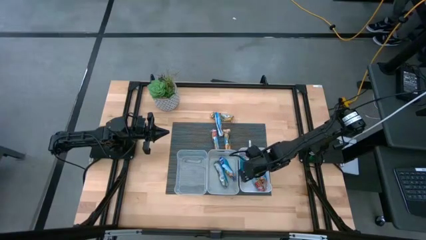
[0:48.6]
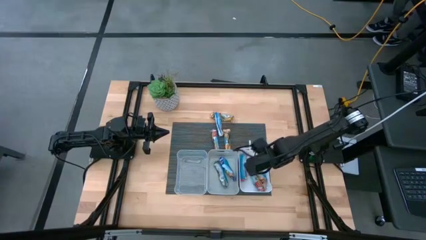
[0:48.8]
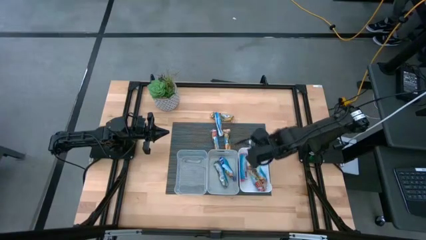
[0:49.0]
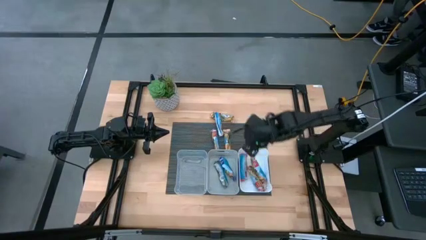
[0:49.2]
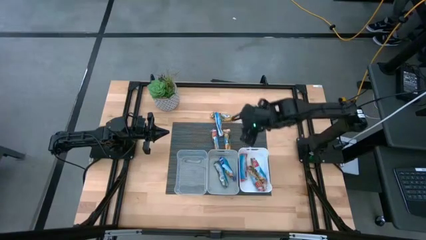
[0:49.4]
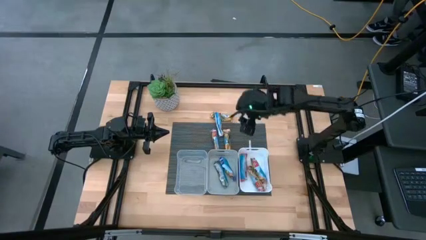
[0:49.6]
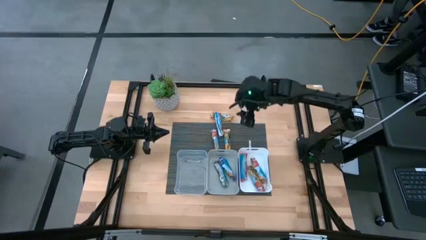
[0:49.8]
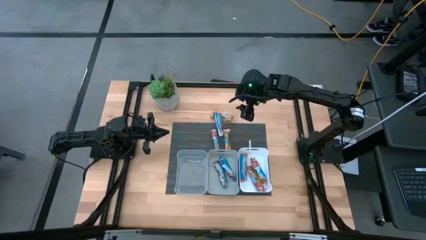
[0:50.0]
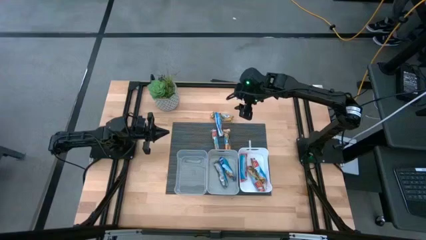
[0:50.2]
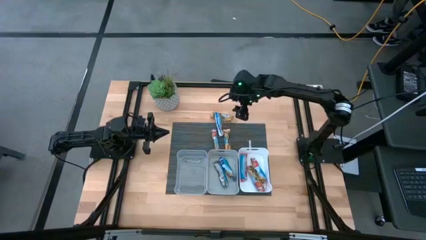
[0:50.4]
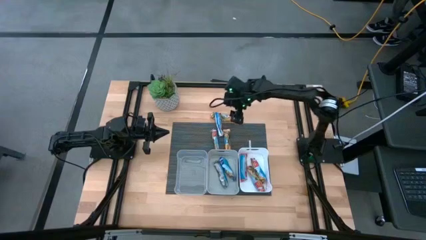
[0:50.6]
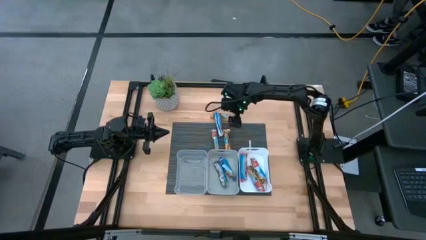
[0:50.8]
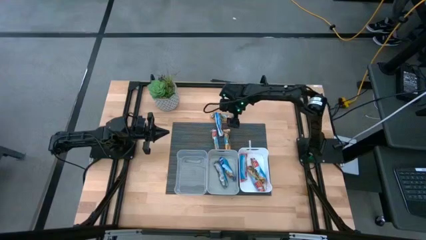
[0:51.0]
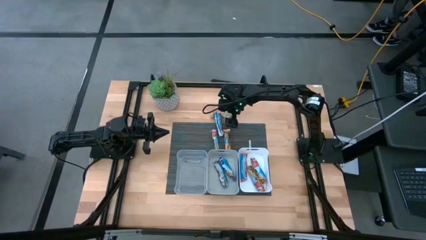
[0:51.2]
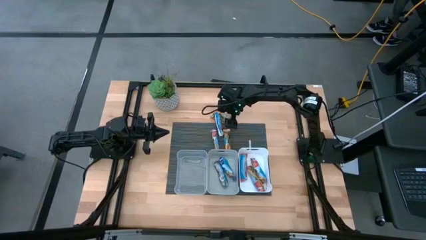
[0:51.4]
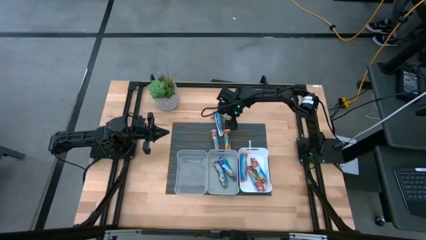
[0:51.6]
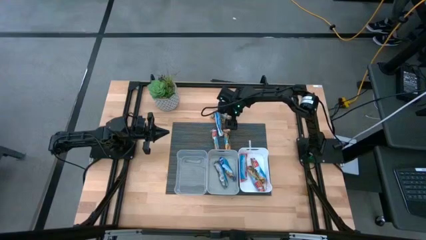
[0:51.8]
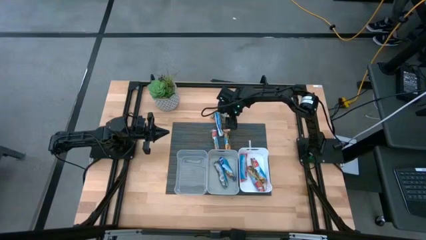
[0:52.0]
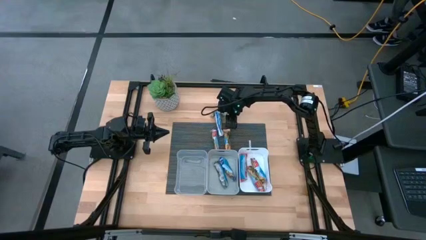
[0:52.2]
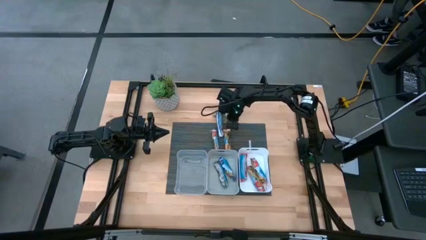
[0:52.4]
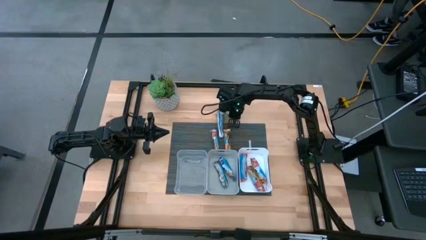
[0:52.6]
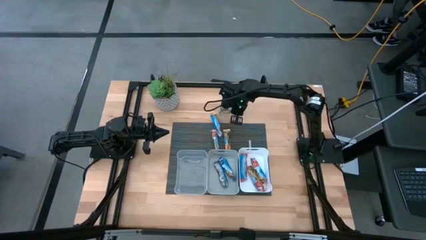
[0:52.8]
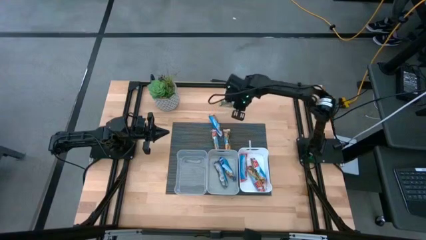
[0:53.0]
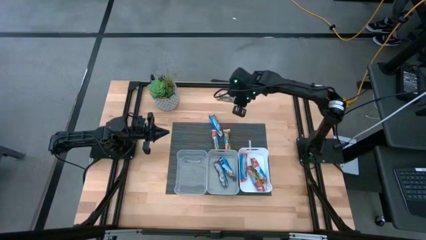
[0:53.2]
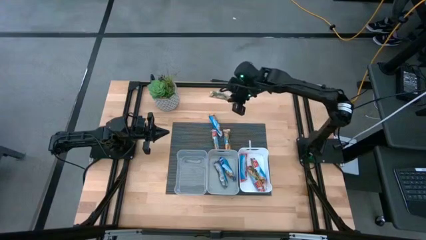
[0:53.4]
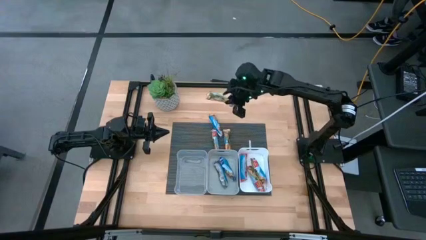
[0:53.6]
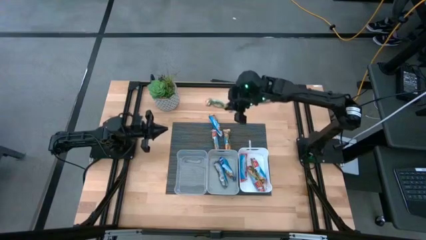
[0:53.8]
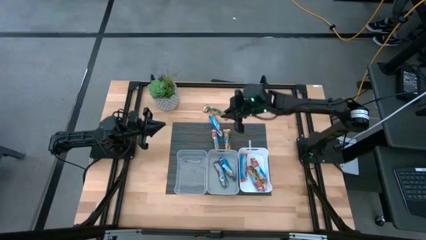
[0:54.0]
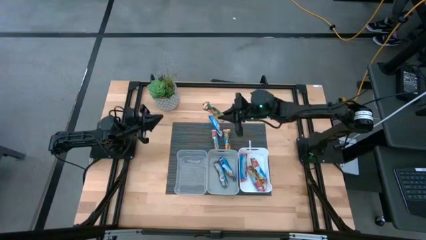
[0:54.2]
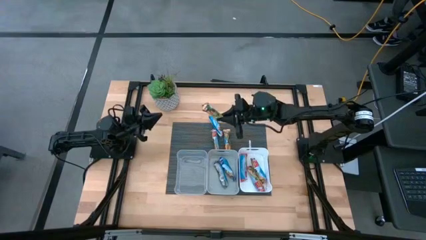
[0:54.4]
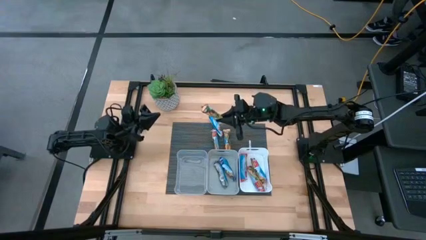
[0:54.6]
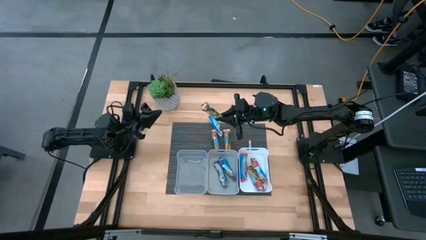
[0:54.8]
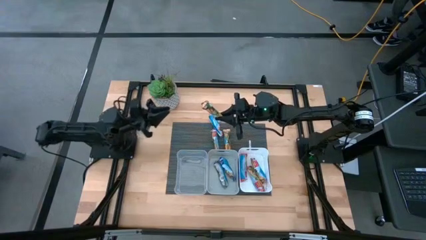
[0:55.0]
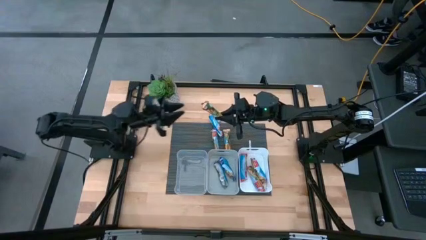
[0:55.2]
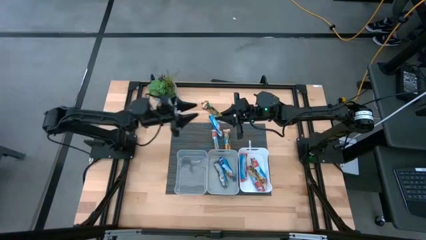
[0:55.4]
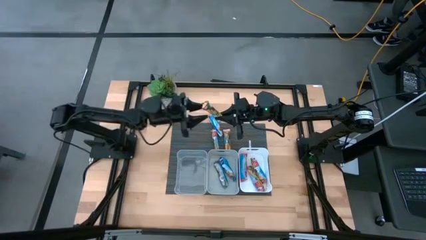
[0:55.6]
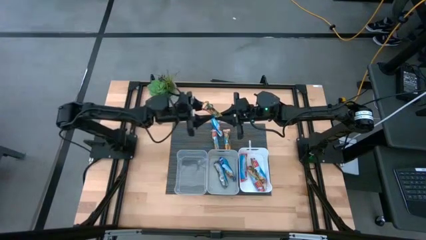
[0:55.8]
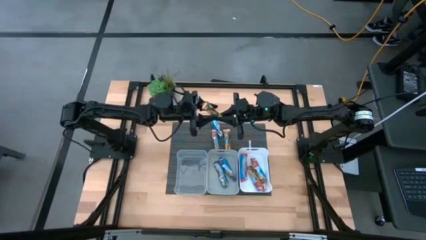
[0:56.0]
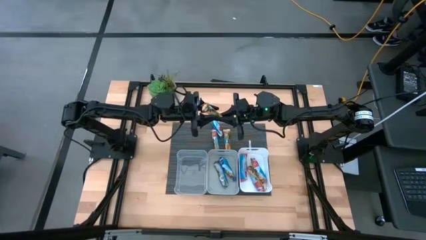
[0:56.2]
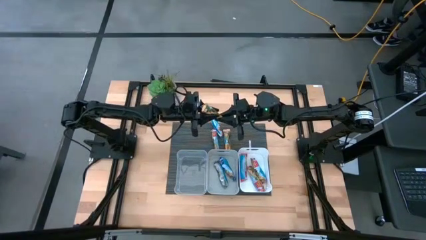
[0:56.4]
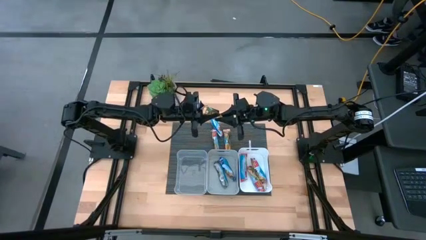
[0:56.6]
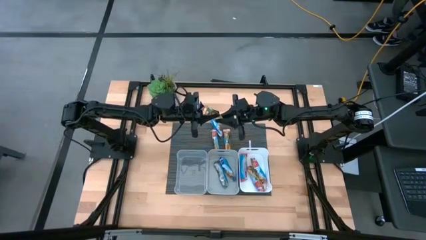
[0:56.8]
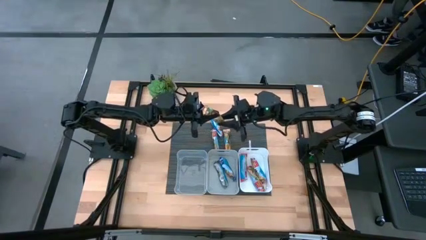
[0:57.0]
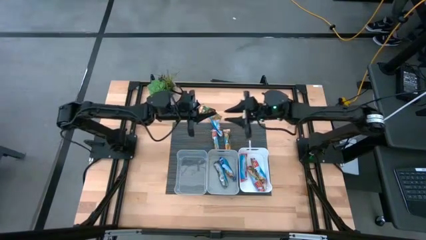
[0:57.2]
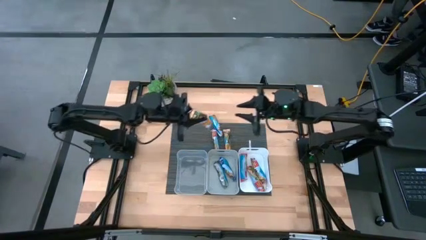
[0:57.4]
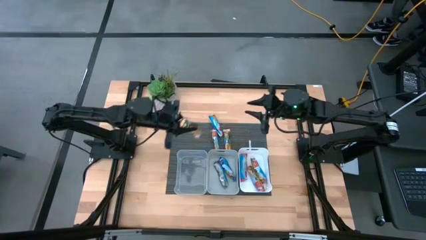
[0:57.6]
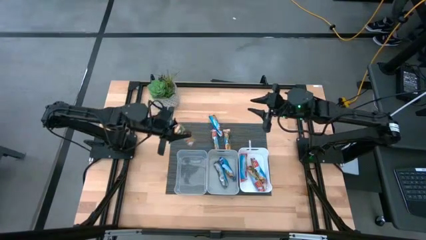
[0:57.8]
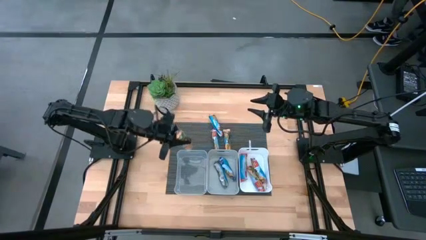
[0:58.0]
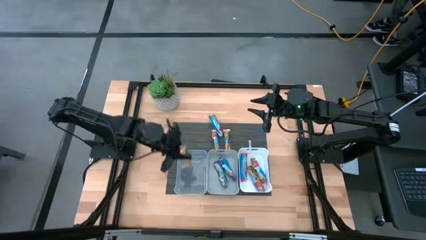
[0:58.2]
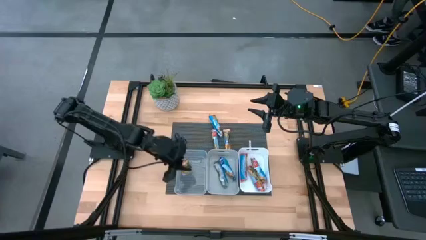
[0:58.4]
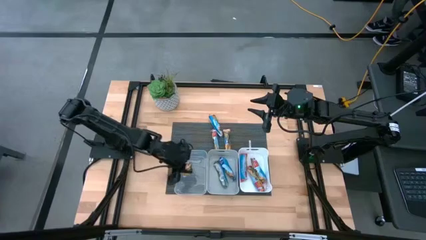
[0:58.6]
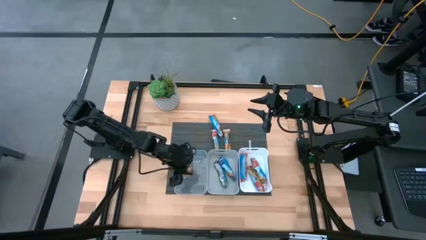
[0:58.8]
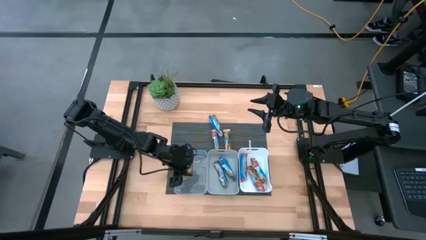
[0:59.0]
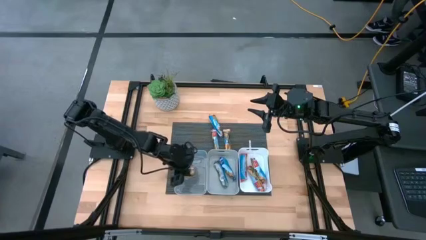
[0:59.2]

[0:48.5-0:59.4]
Task: Pick and place Granola Bars by type
Put the yellow granola bar into the transparent bin

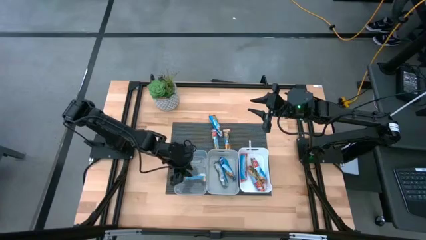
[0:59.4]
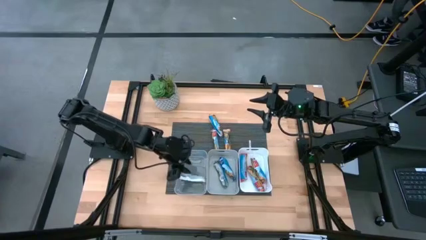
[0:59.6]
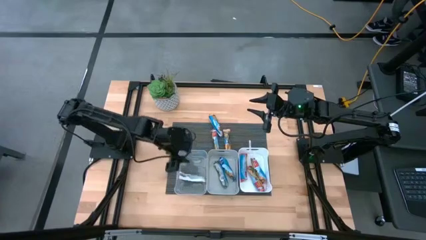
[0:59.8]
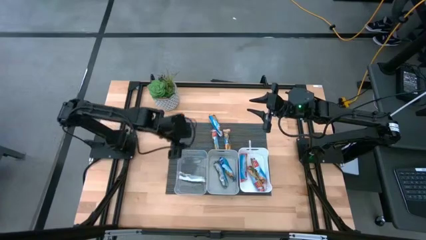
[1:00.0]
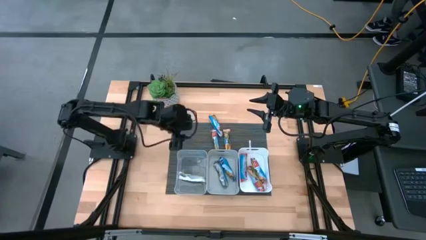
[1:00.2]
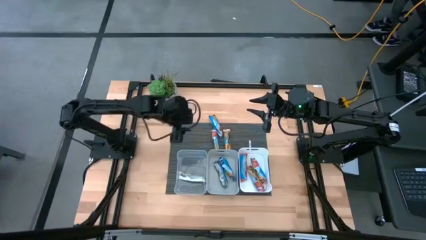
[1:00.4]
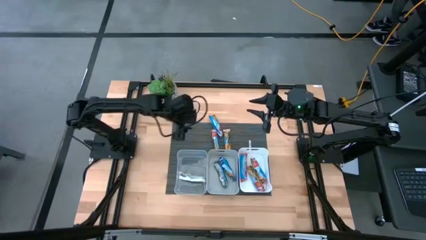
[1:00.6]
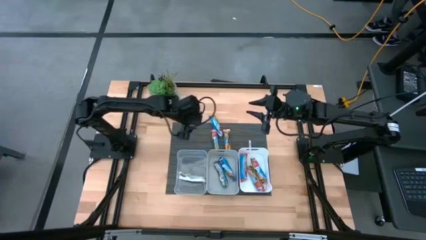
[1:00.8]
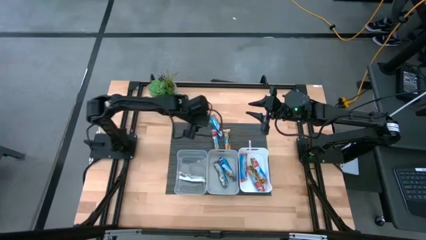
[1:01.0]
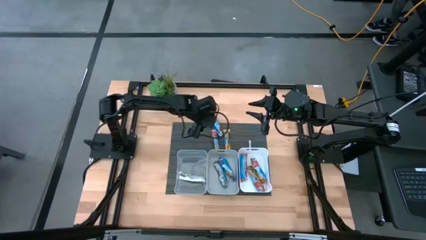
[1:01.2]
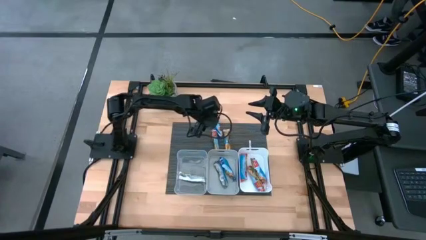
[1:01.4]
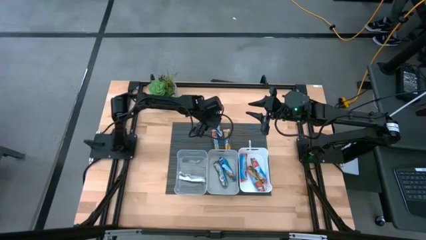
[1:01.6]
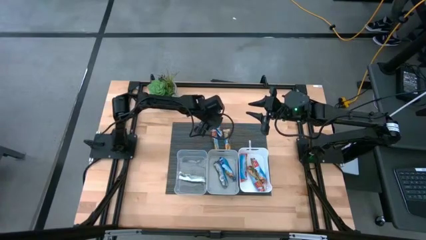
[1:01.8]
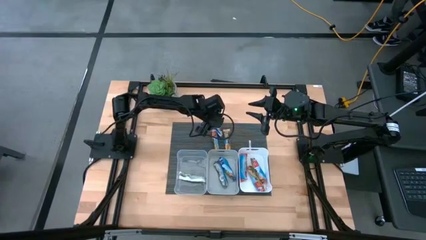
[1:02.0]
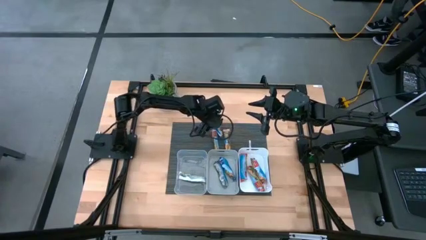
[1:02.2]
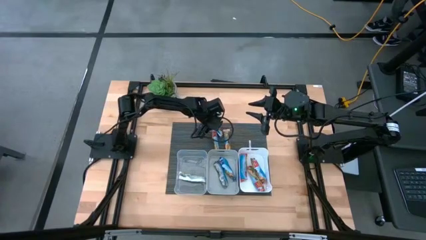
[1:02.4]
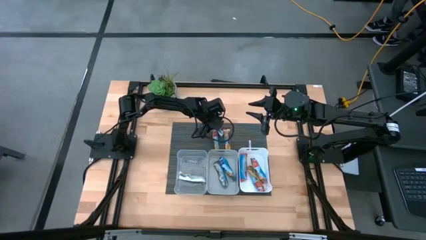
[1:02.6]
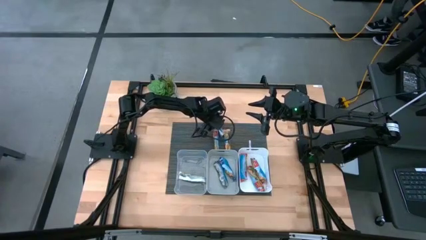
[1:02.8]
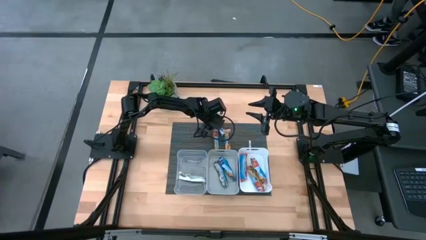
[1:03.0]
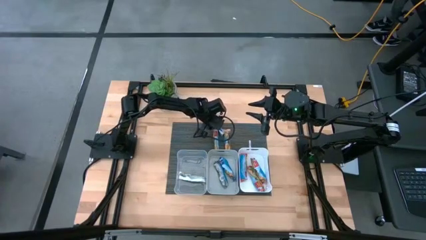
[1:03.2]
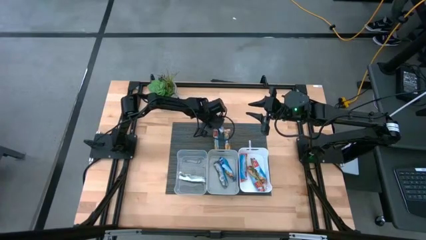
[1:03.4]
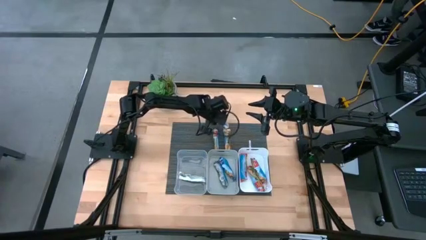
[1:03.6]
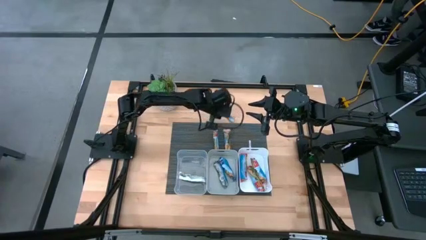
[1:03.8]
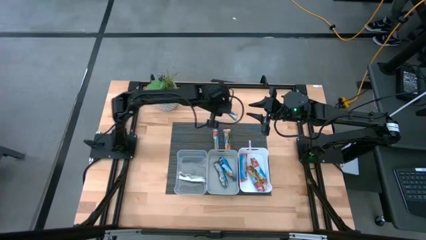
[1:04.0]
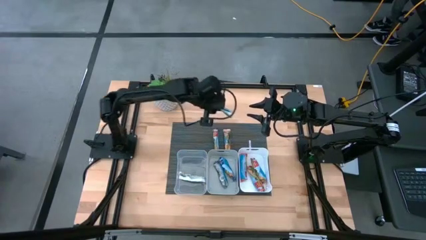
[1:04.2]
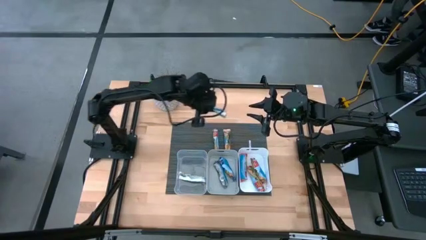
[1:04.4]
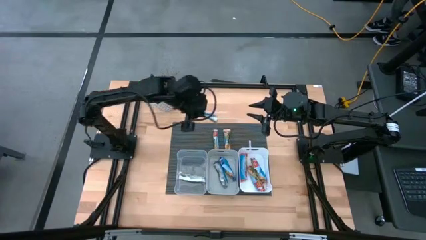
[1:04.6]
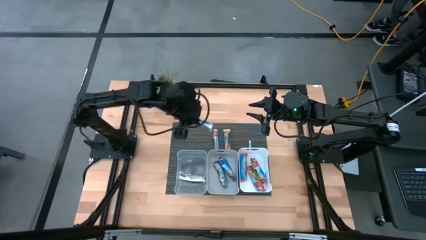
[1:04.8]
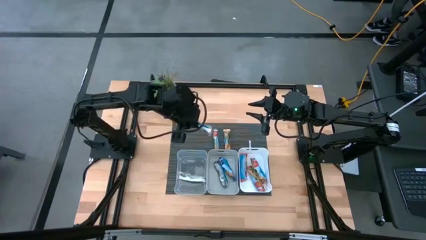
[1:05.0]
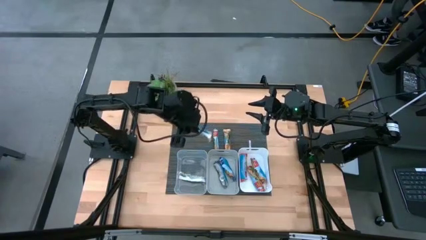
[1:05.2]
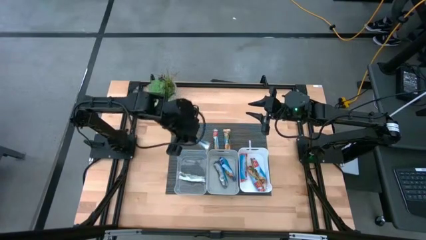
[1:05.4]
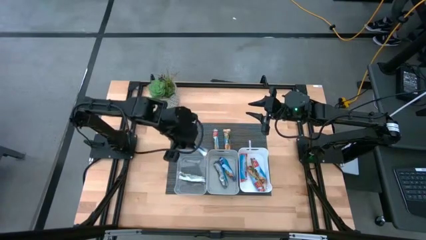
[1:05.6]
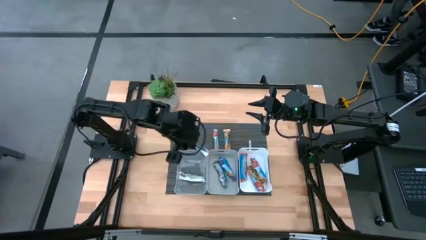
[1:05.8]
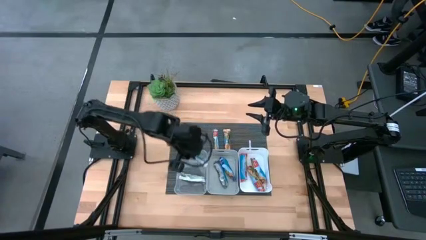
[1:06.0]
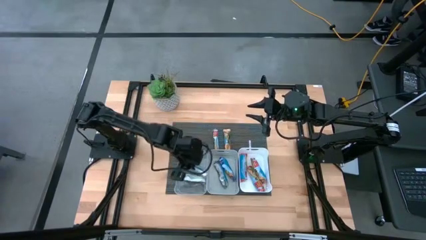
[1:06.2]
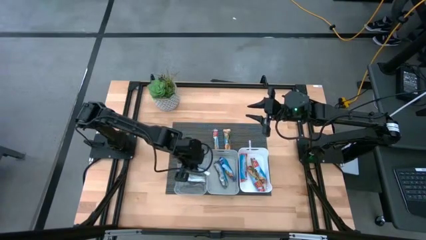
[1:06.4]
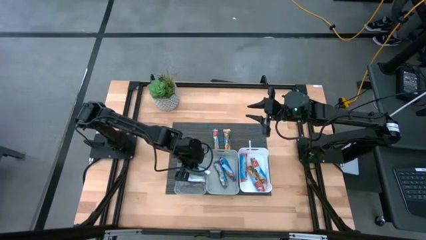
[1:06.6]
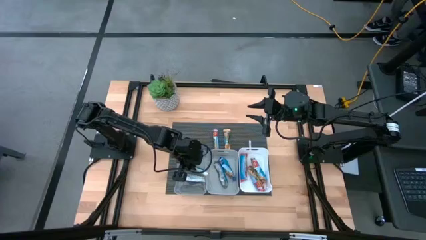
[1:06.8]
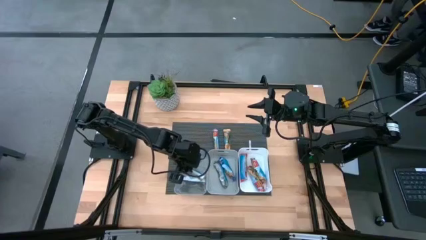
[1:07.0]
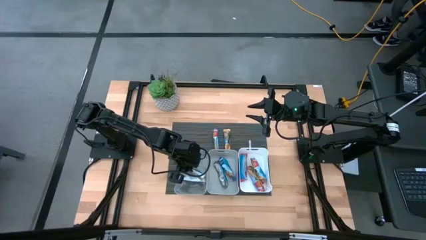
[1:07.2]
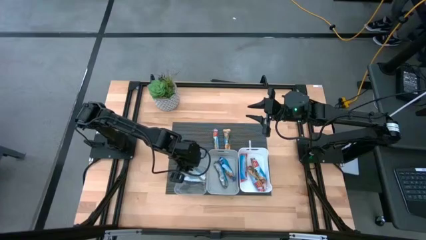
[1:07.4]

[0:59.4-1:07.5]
Put the yellow granola bar into the transparent bin
